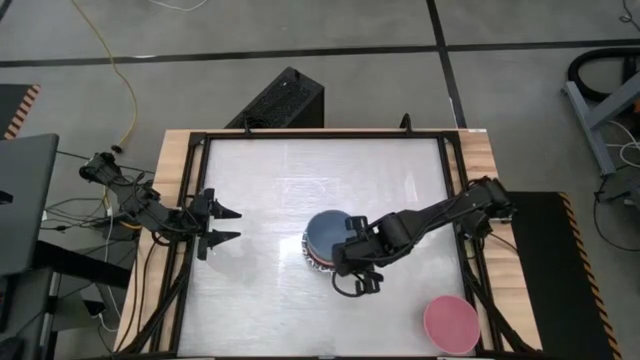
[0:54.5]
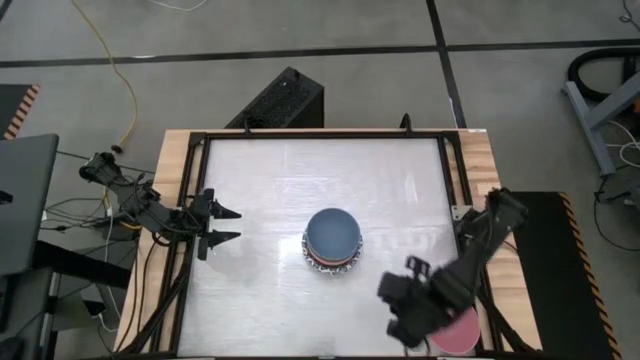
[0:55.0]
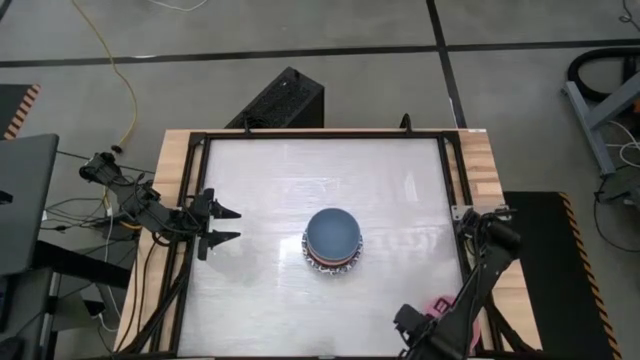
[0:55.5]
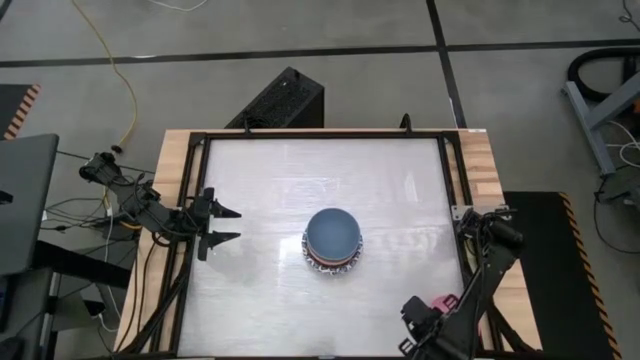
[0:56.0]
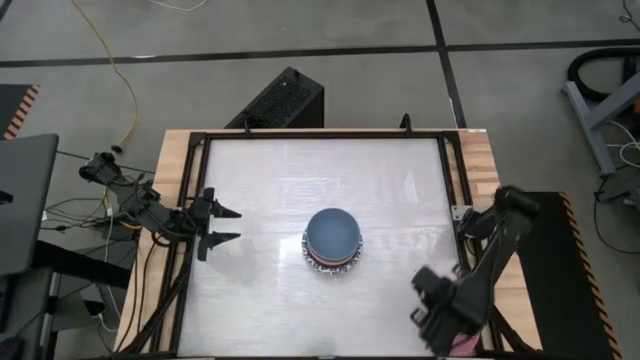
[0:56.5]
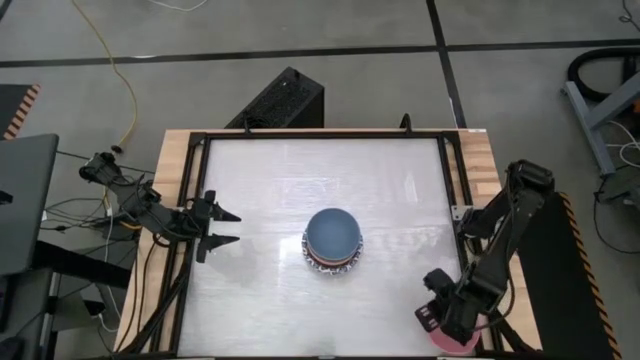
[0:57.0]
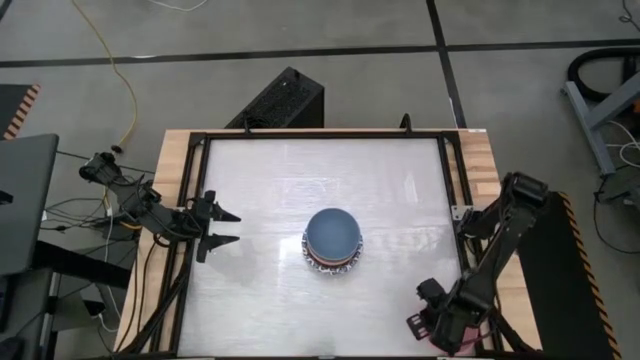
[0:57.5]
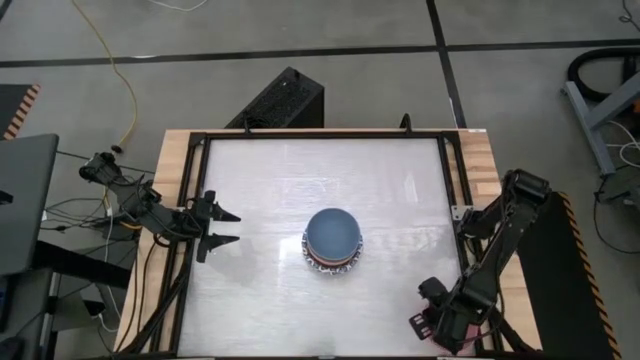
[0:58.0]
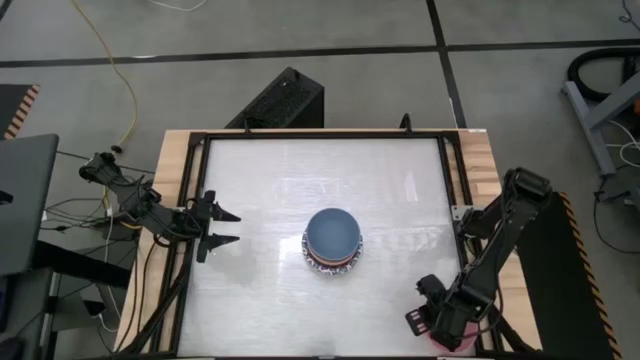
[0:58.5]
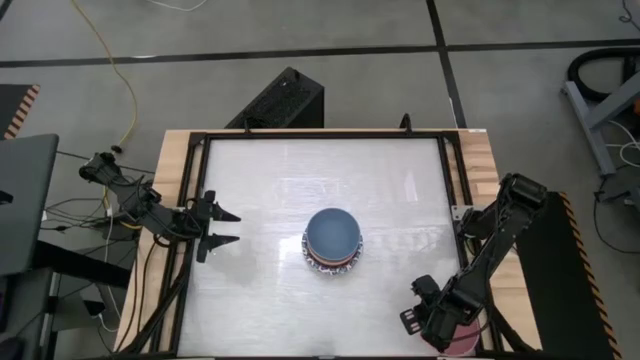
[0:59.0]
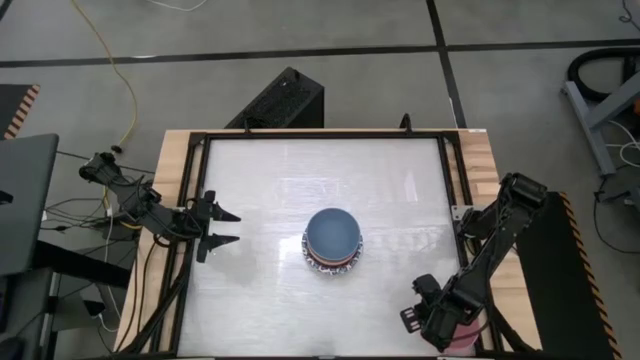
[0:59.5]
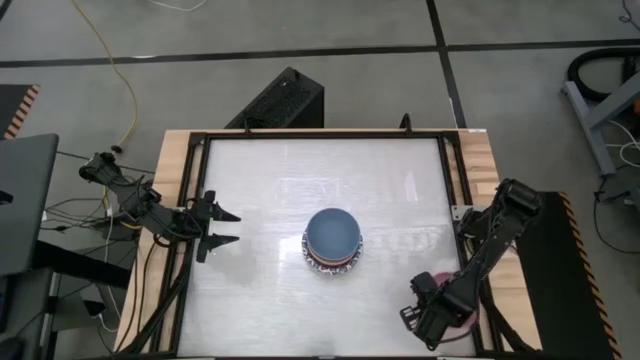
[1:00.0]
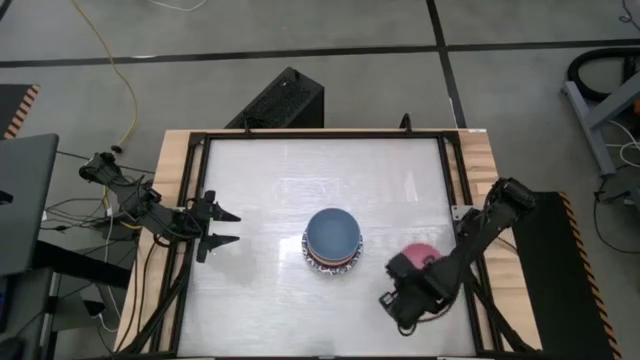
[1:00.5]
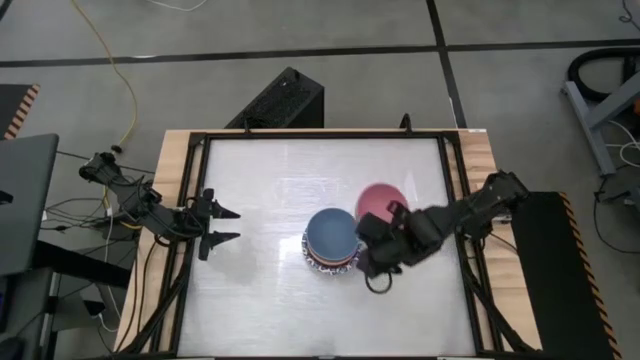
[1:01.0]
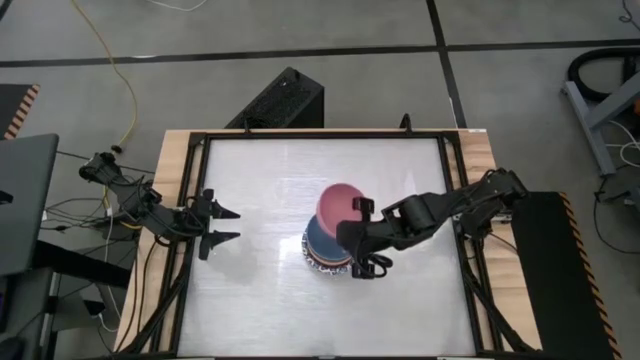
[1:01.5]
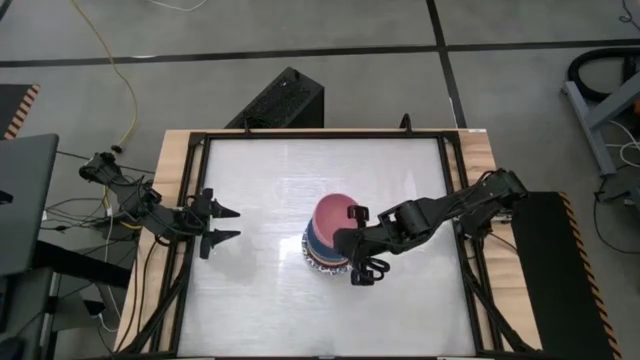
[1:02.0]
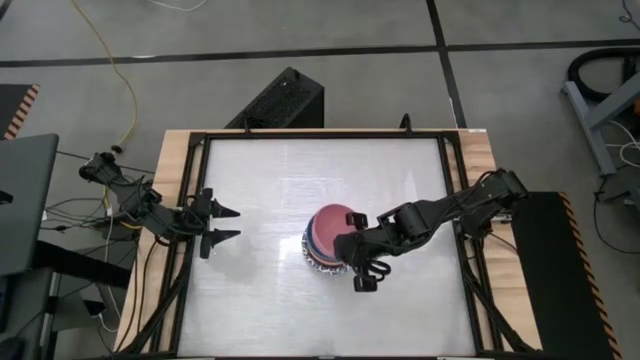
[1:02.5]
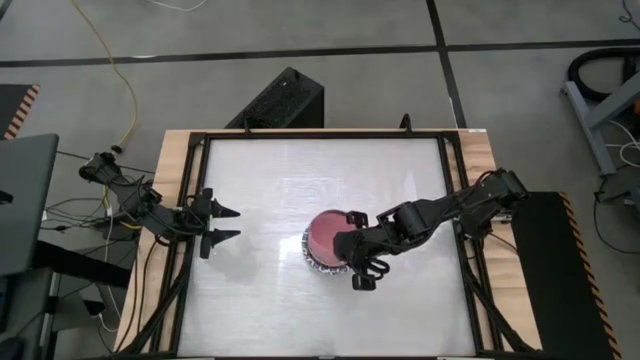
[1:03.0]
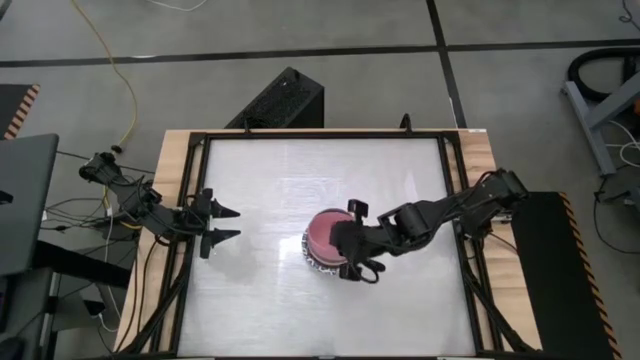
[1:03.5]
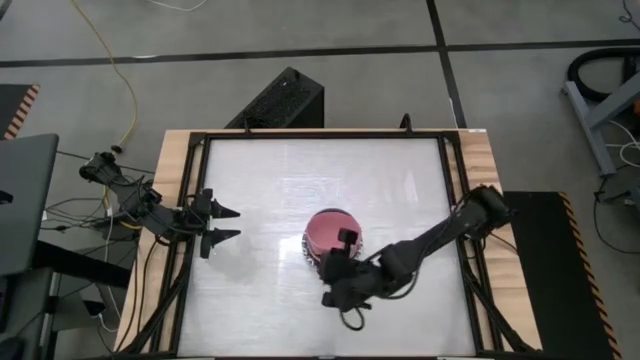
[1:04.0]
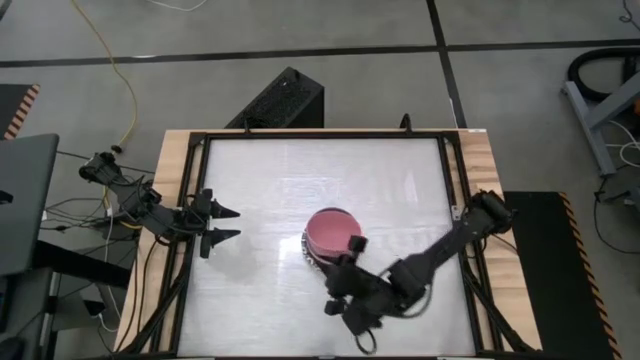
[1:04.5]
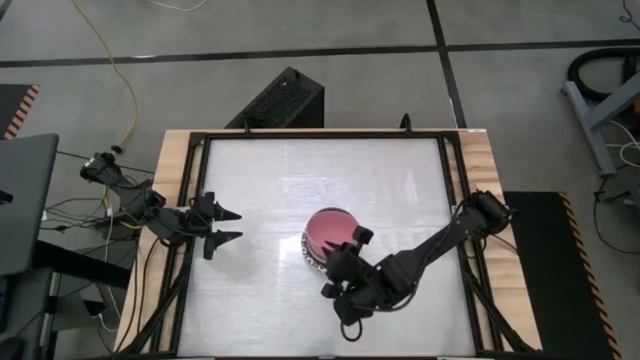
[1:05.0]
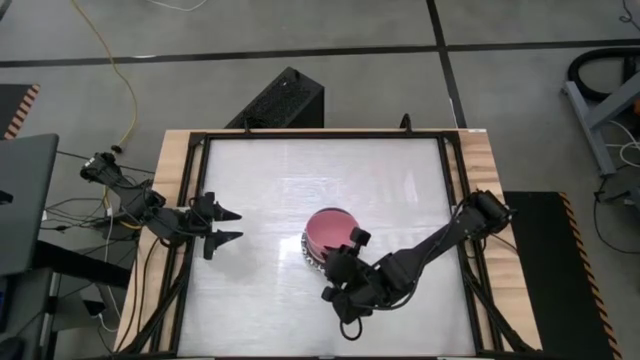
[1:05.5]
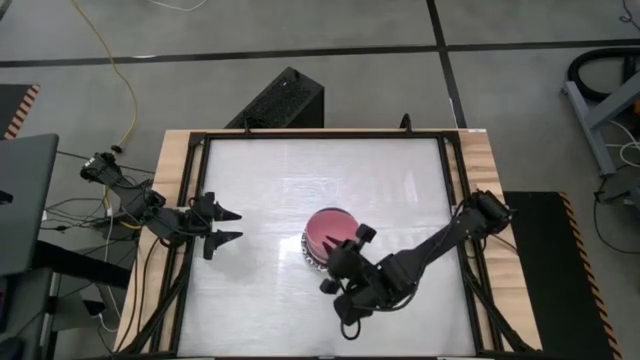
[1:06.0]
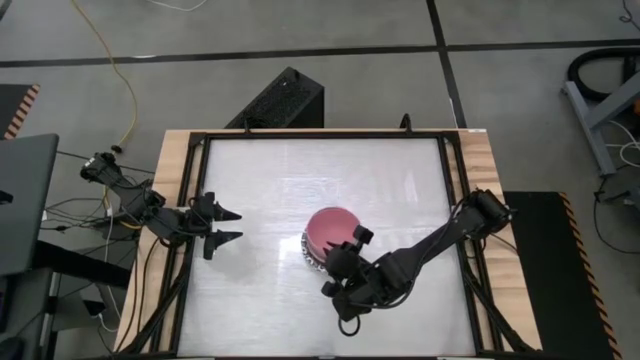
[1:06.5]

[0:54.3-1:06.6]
Stack the pink bowl into the blue bowl

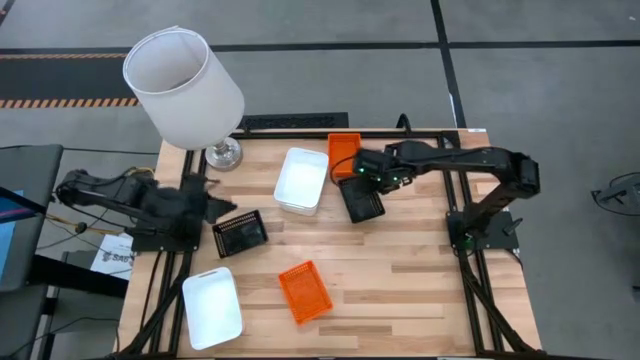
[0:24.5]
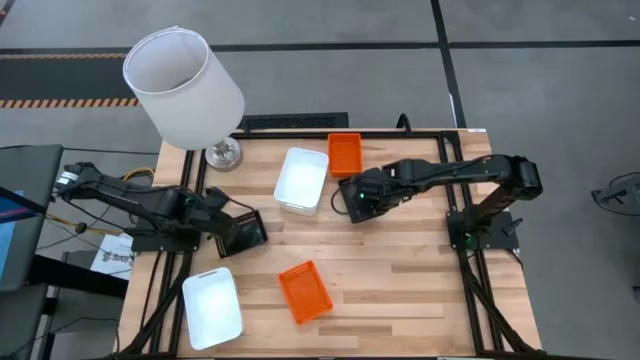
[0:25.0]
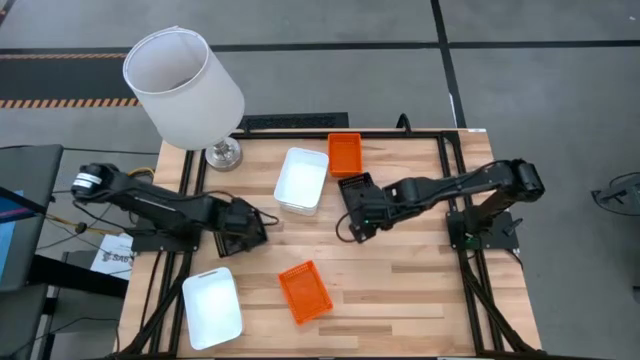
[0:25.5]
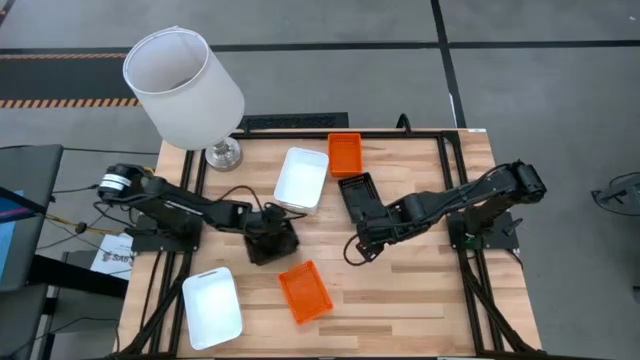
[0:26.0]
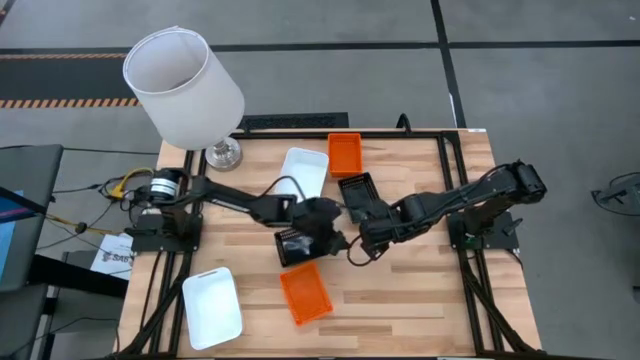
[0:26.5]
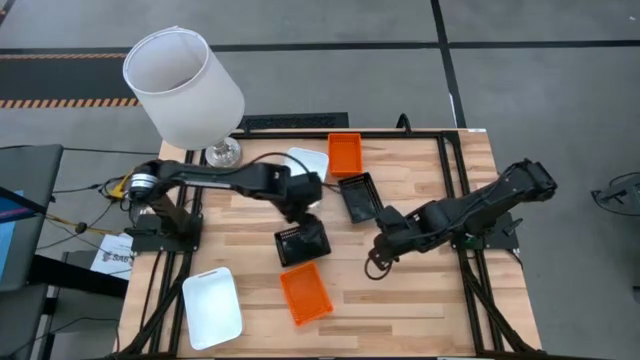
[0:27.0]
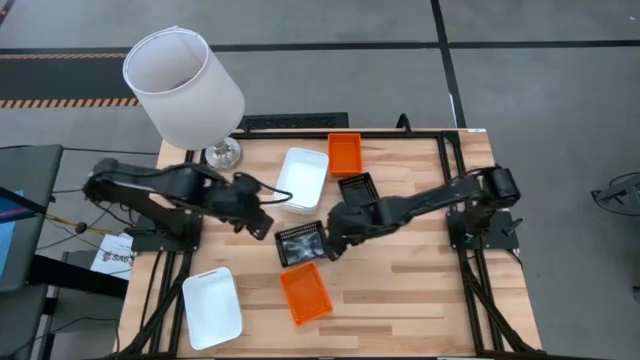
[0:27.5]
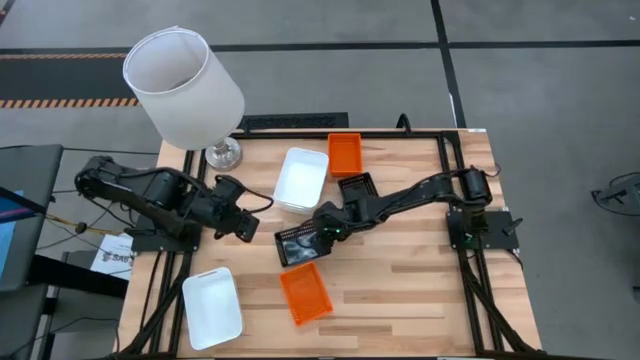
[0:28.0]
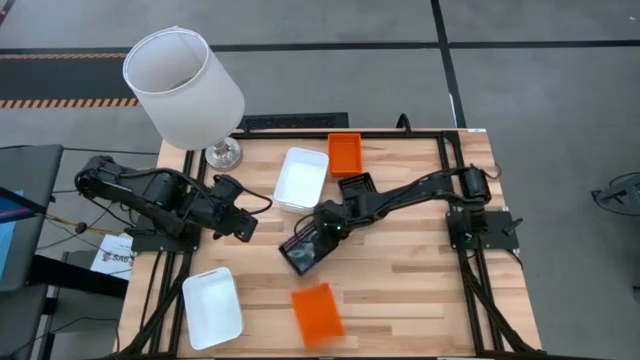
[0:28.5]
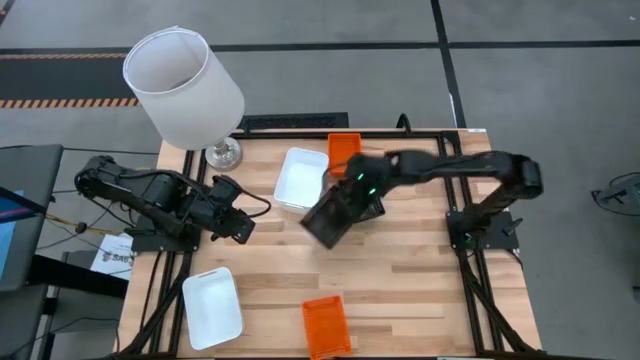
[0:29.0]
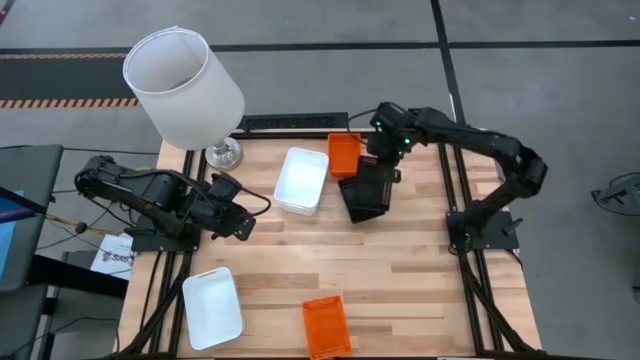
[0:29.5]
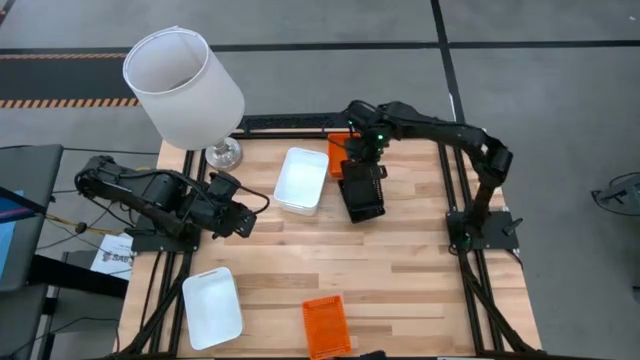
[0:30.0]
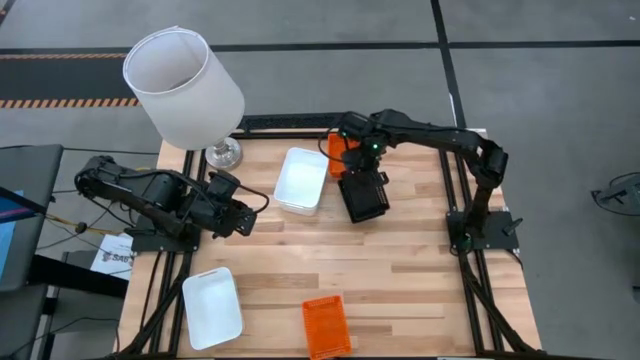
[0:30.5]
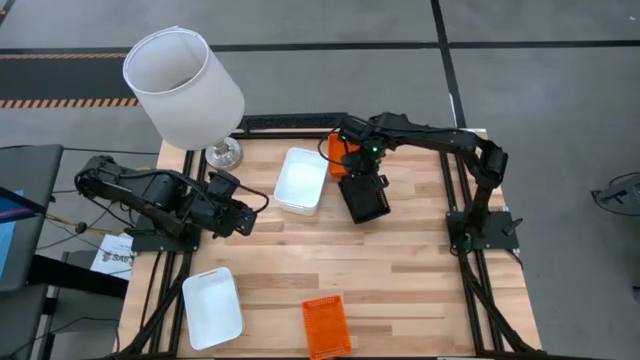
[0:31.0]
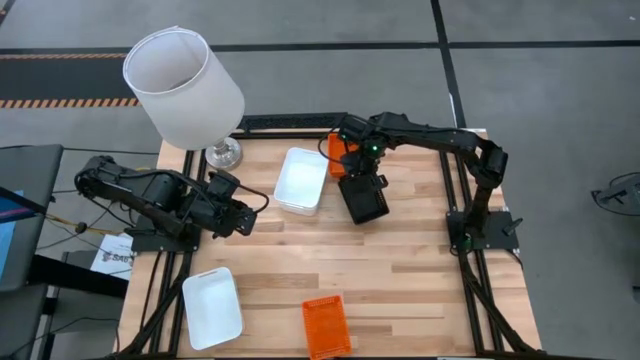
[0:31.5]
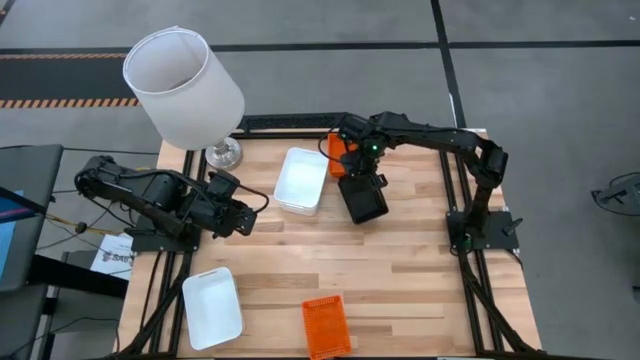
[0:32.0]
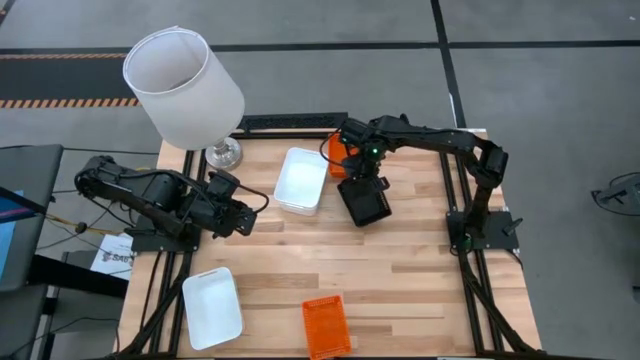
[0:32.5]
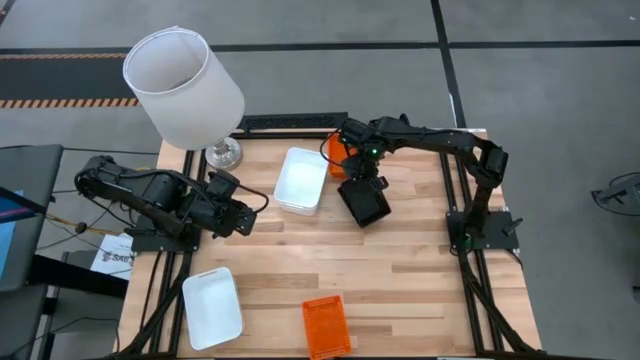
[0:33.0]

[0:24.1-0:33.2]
Stack the black bin on the right black bin
